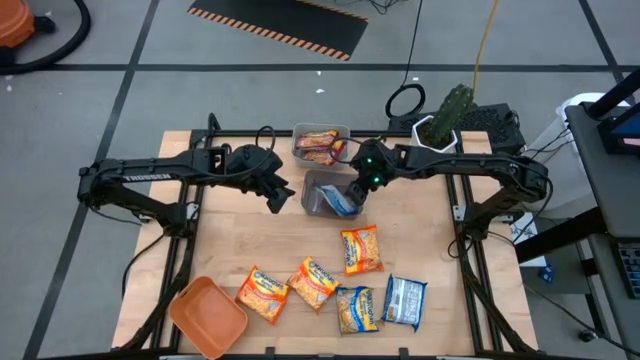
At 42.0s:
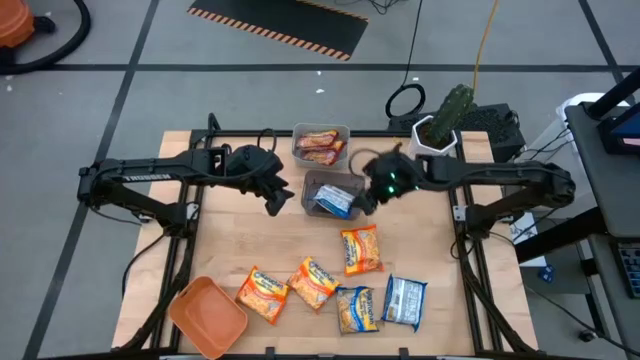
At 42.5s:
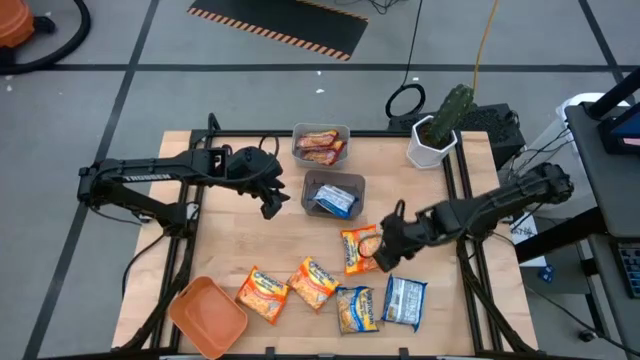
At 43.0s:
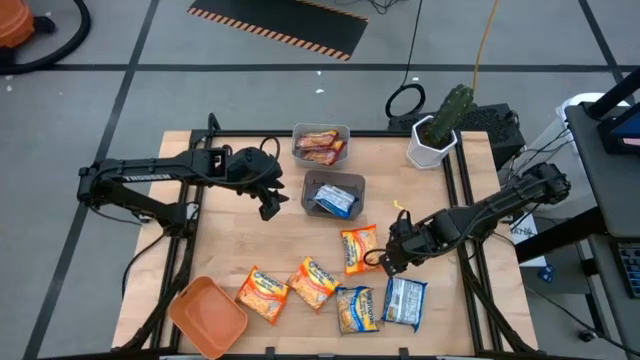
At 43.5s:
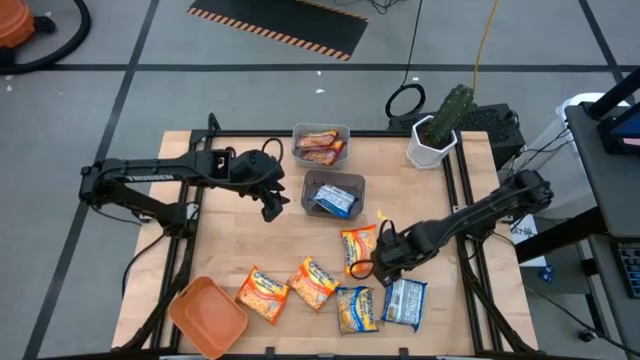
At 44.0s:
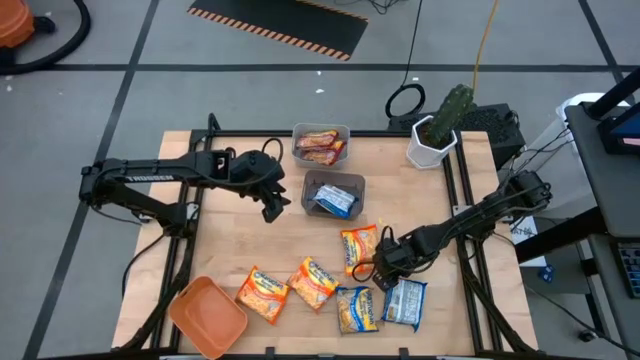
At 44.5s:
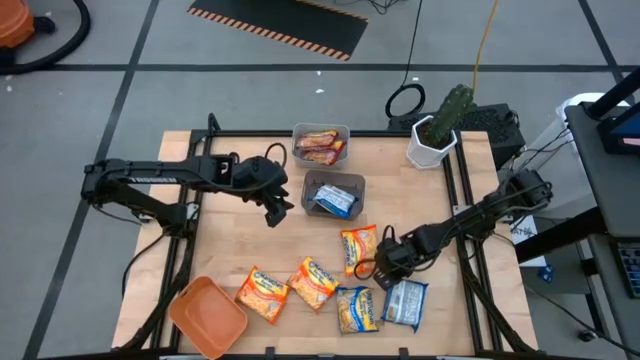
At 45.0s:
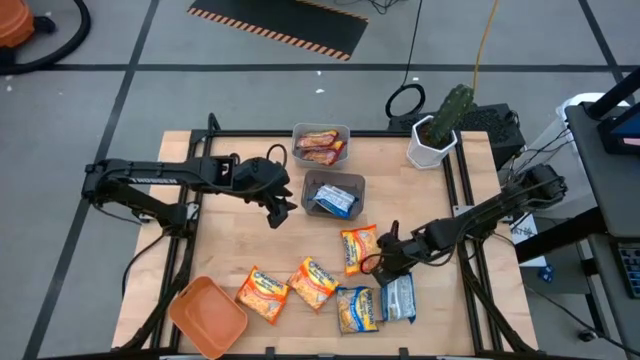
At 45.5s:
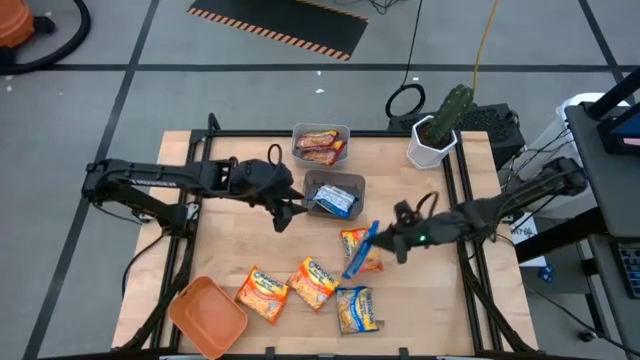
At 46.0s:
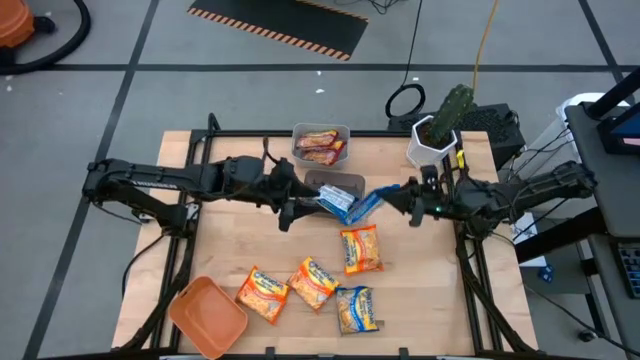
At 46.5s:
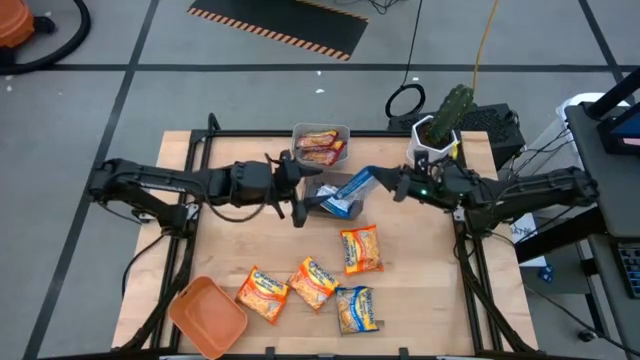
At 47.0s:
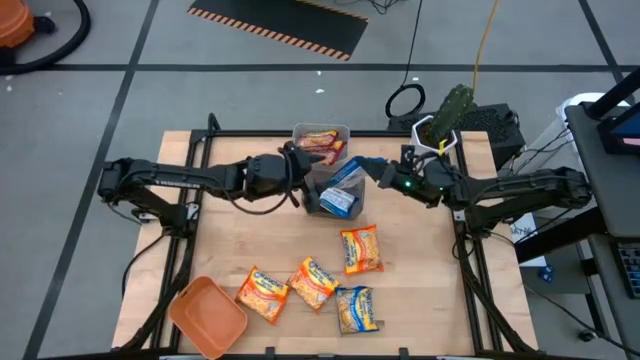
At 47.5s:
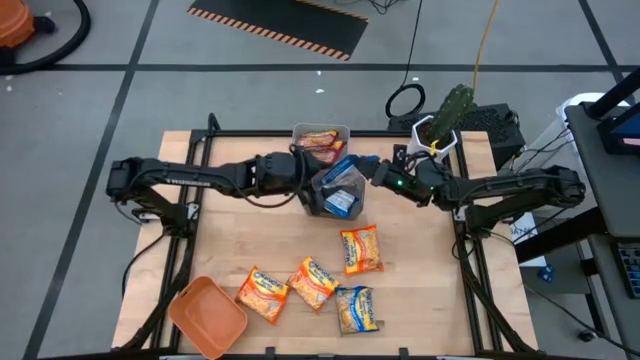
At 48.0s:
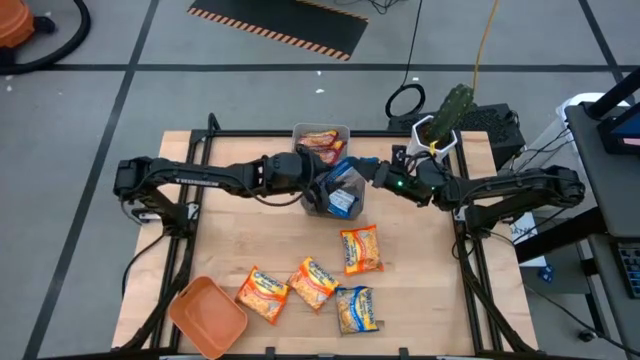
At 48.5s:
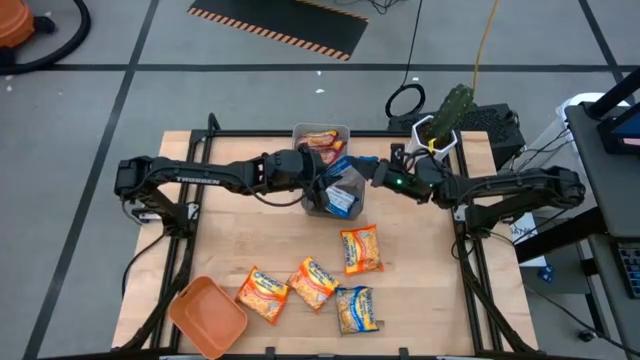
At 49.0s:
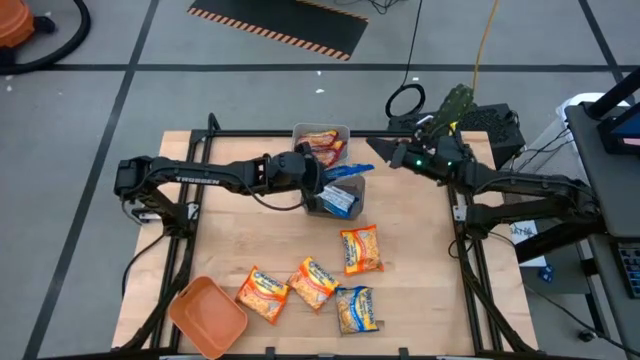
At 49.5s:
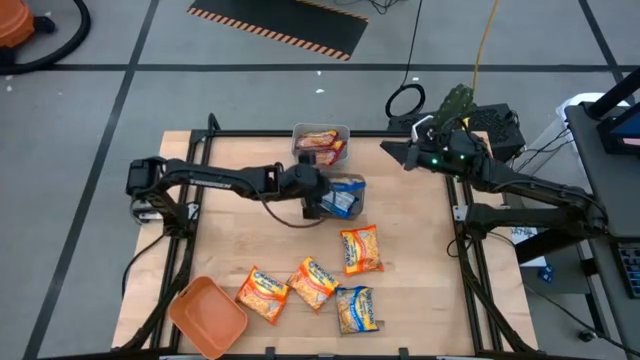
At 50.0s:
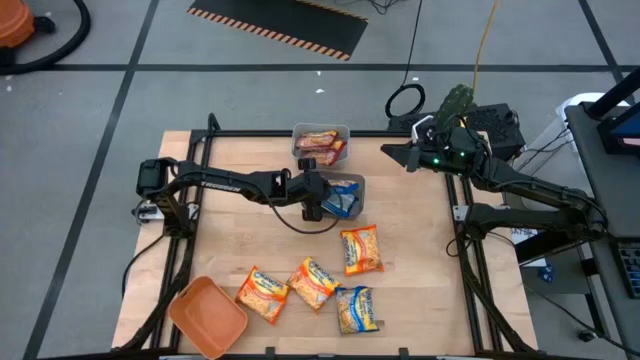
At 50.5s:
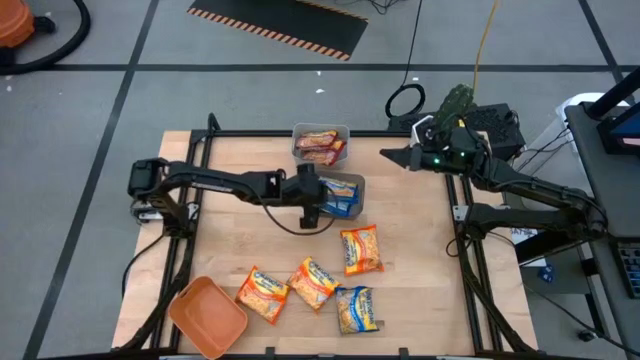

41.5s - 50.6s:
Task: Sort Maruchan noodles
Put the right blue noodle pack into the black bin

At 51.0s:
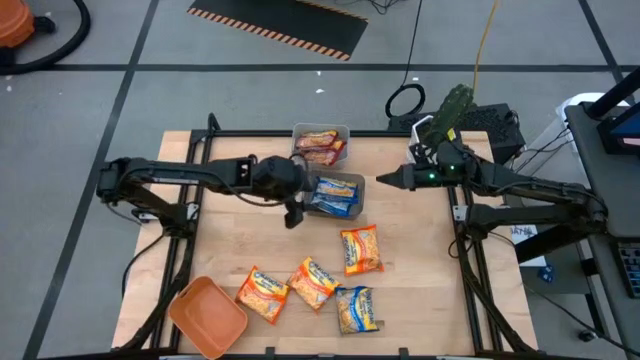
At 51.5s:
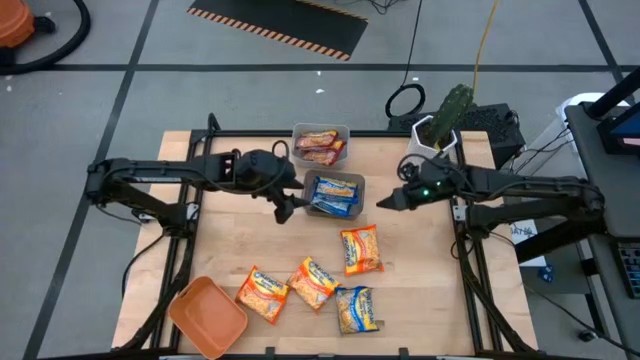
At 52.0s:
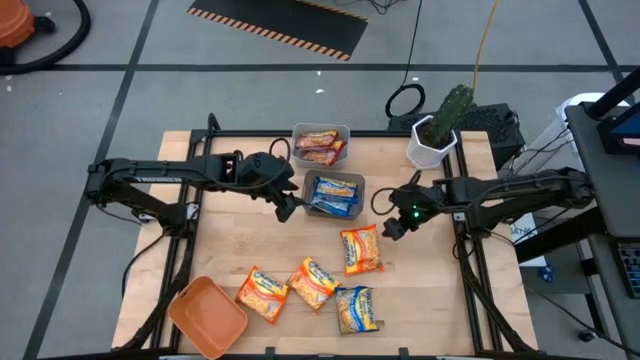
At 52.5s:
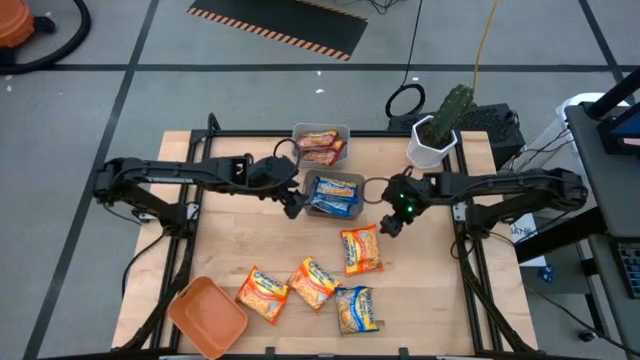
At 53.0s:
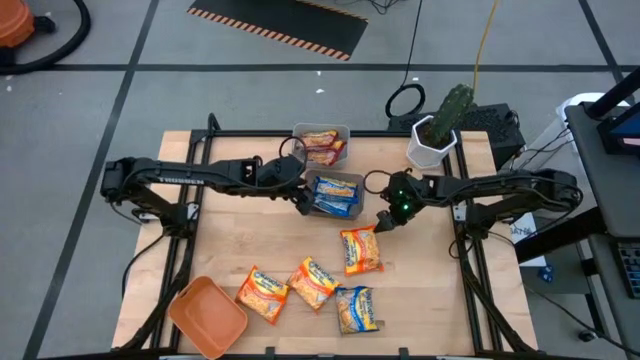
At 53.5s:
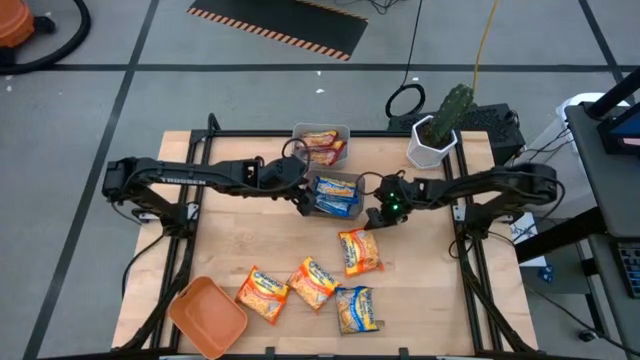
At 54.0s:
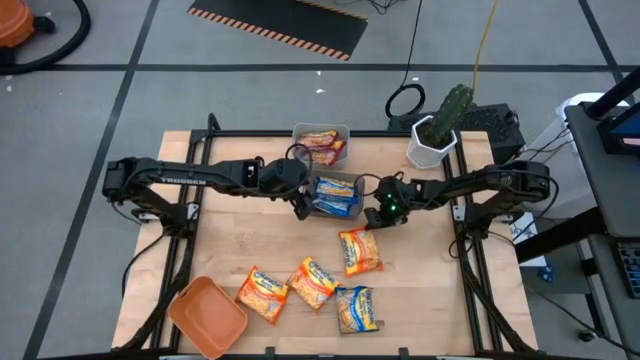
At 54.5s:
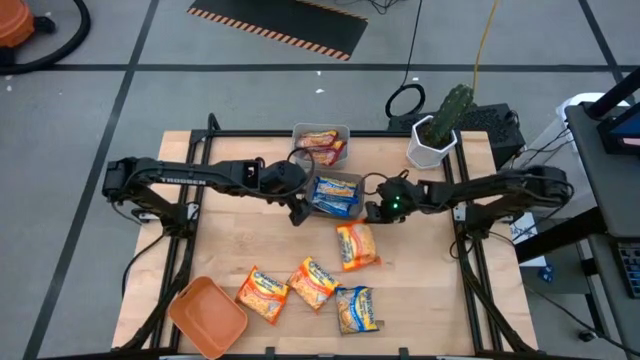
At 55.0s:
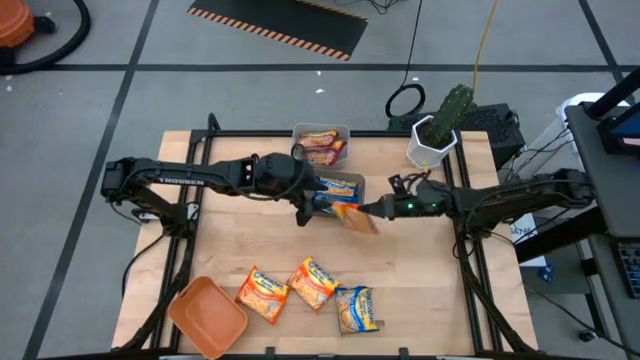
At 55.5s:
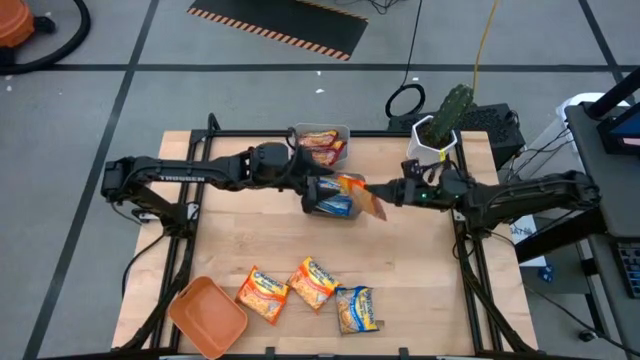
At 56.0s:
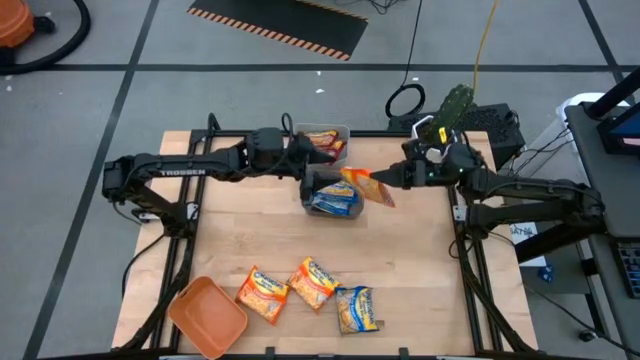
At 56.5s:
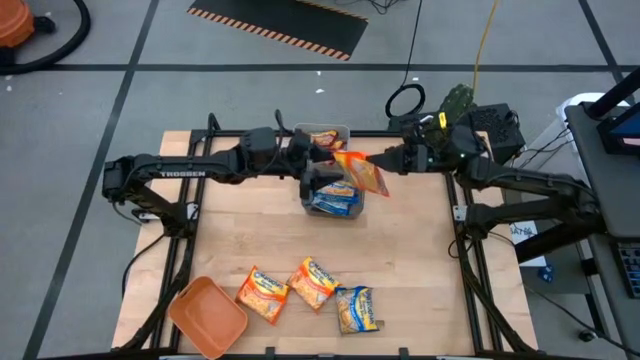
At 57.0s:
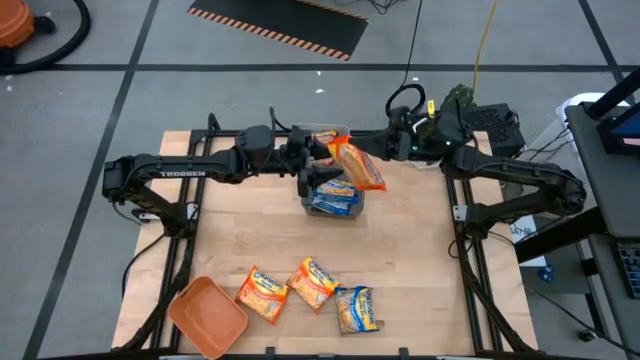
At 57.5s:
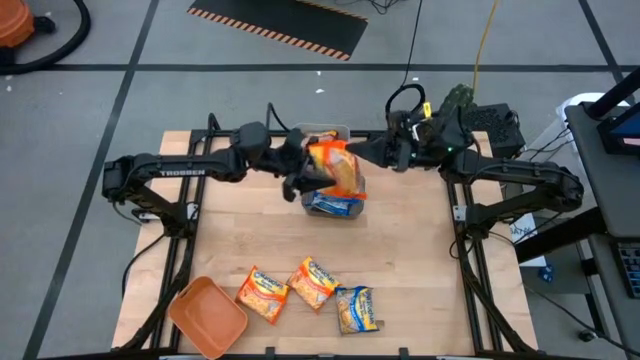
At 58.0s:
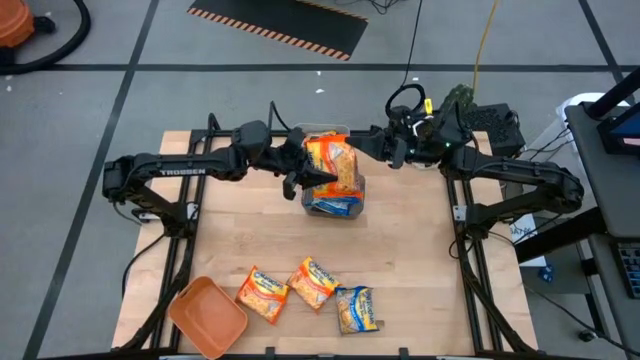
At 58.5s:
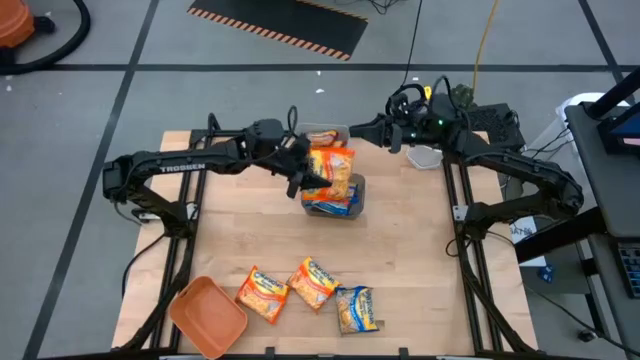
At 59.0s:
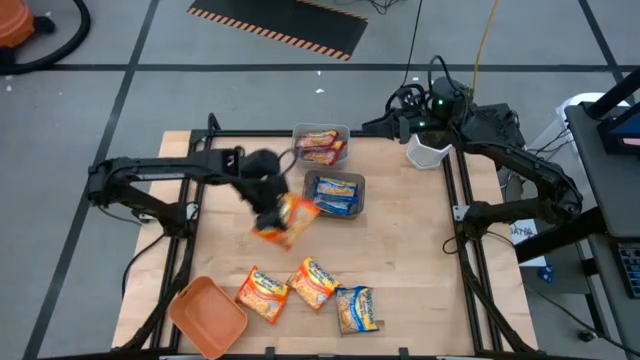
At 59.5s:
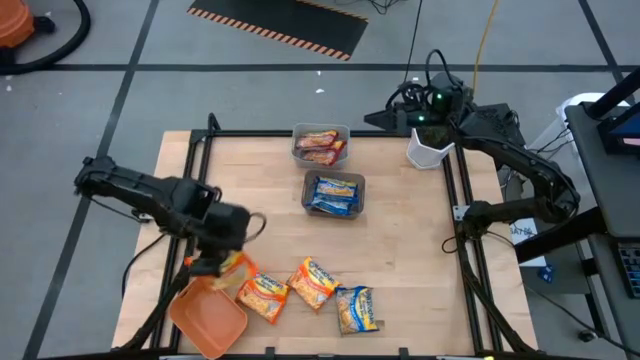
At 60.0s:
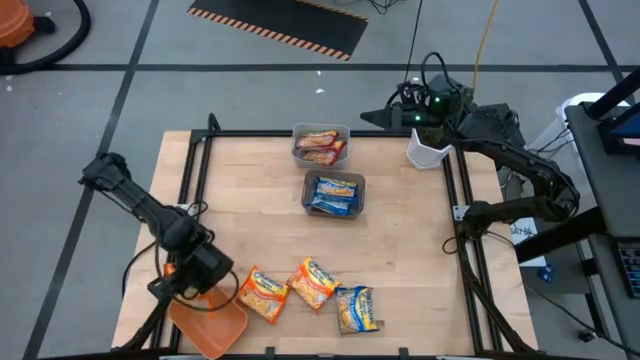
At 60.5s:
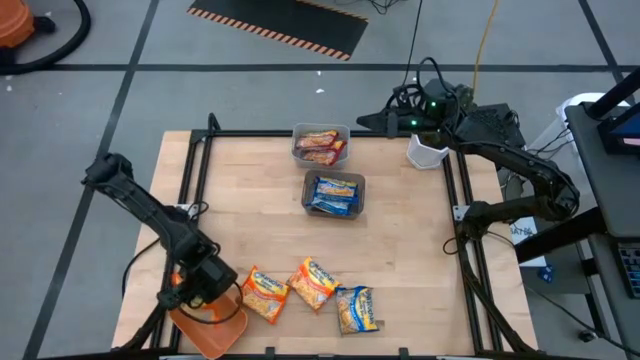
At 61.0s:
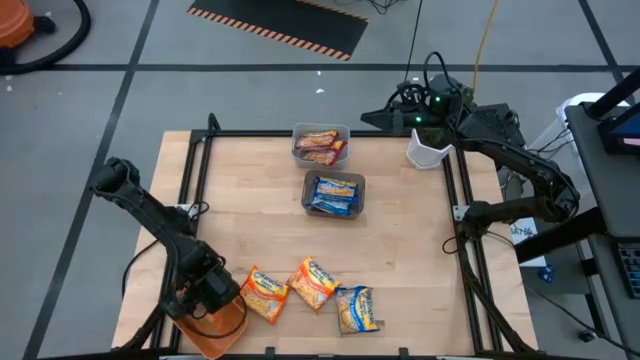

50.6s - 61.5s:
Put the top orange noodle pack into the orange bin

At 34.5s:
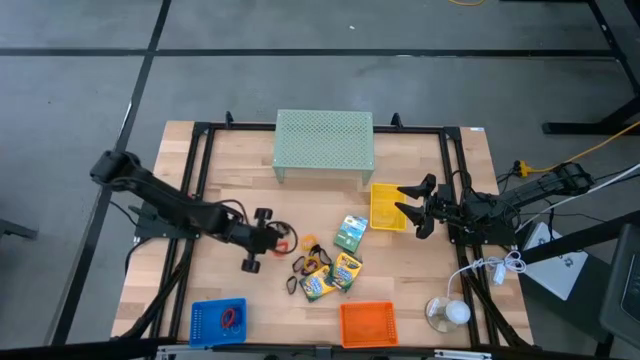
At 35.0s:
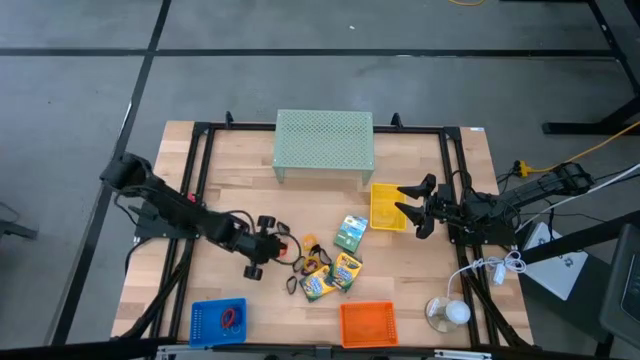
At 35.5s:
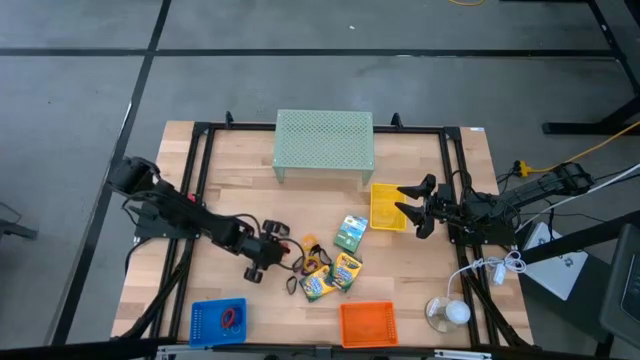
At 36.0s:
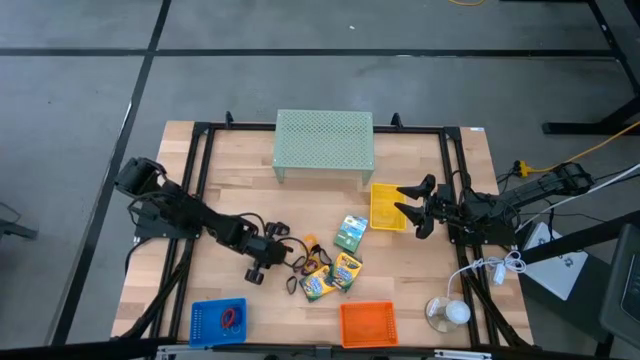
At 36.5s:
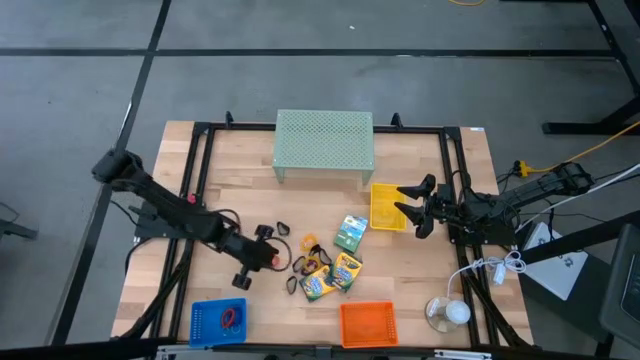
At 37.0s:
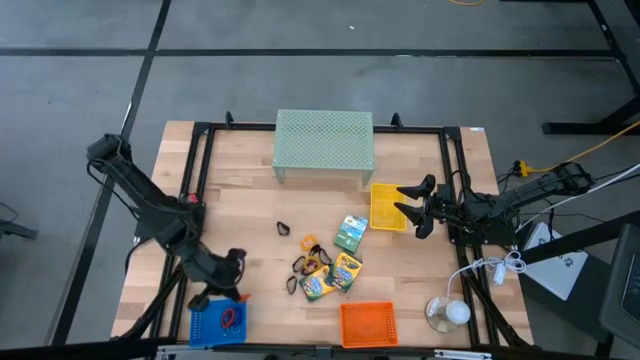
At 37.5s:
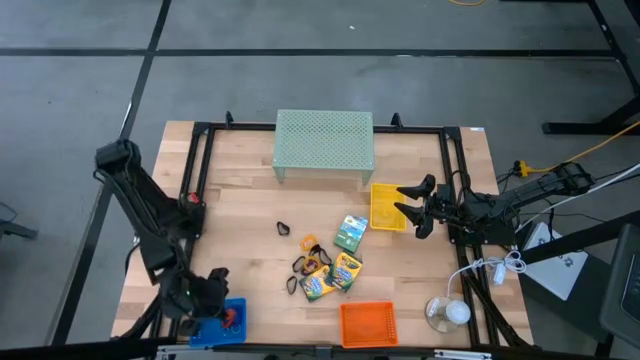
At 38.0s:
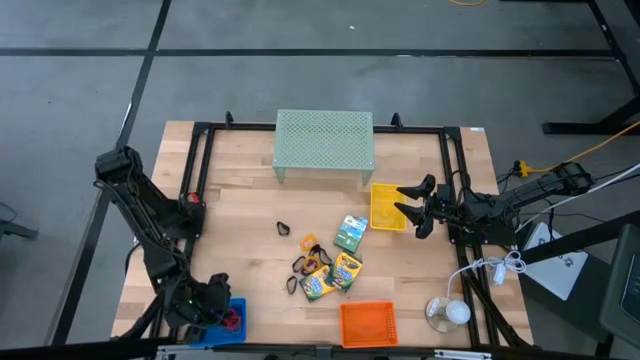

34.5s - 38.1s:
Task: Pick & Place Office Desk Supplies
Put the orange spring keychain into the blue bin
